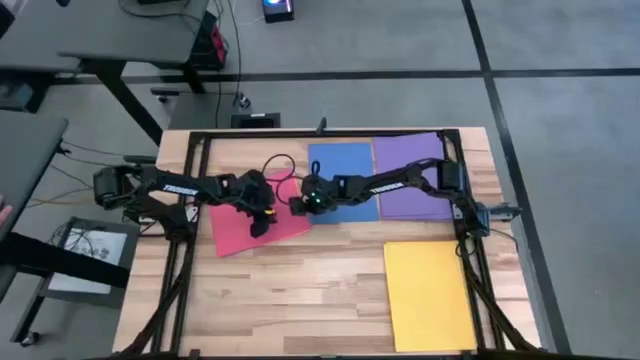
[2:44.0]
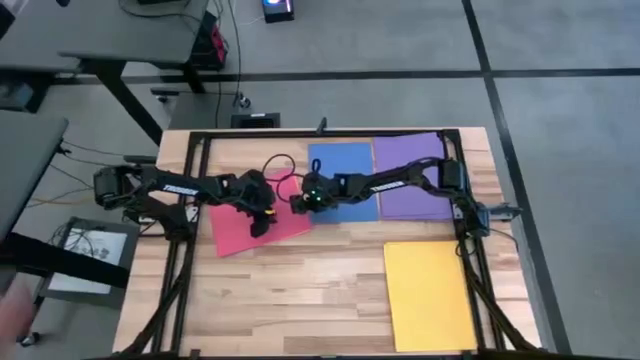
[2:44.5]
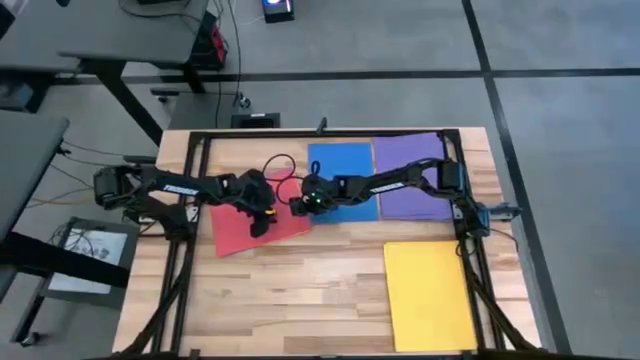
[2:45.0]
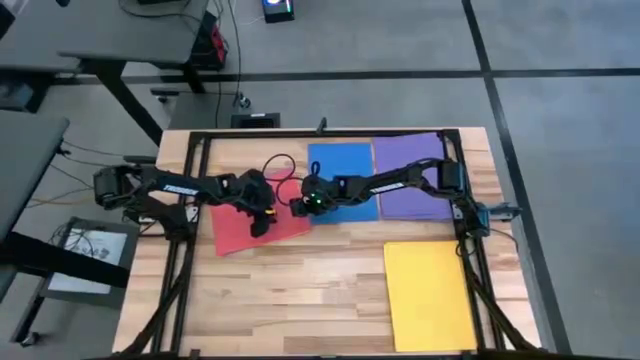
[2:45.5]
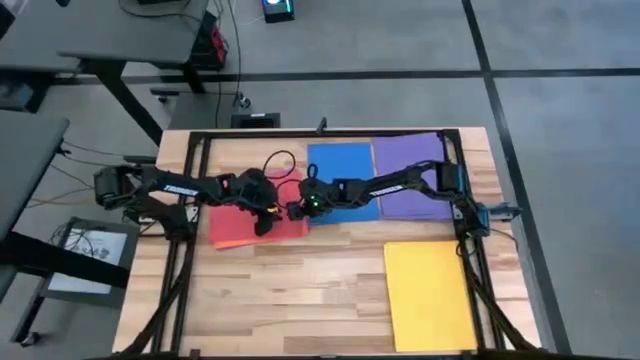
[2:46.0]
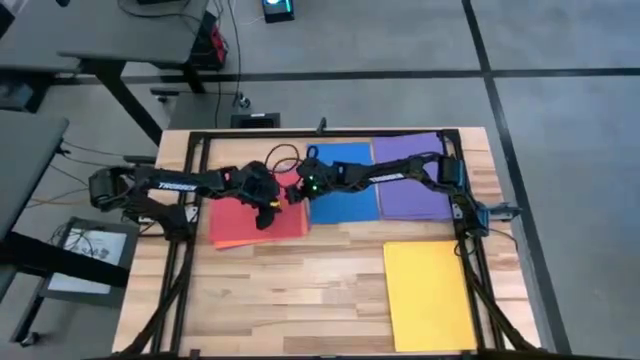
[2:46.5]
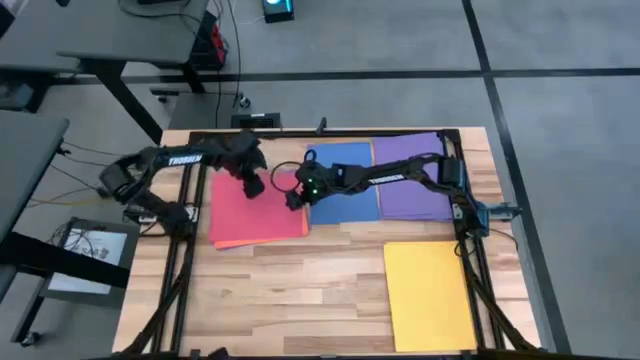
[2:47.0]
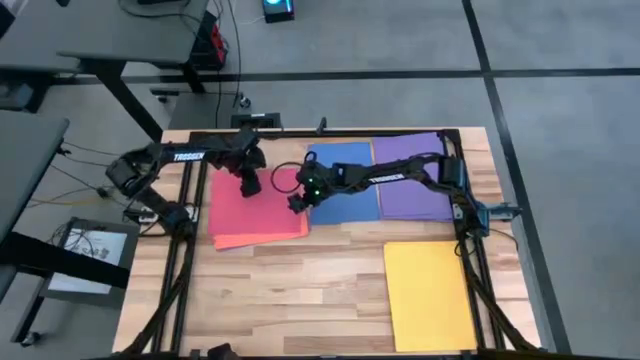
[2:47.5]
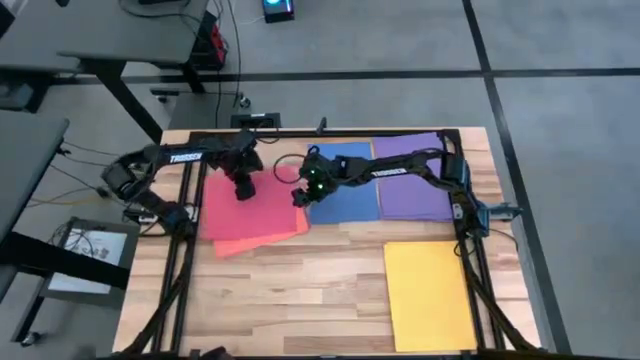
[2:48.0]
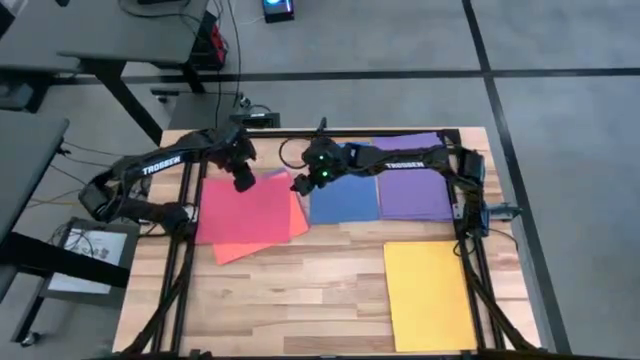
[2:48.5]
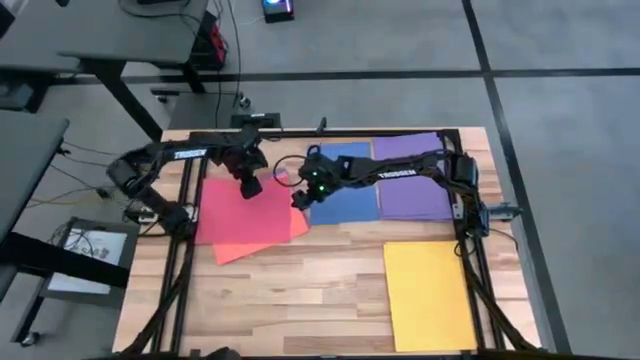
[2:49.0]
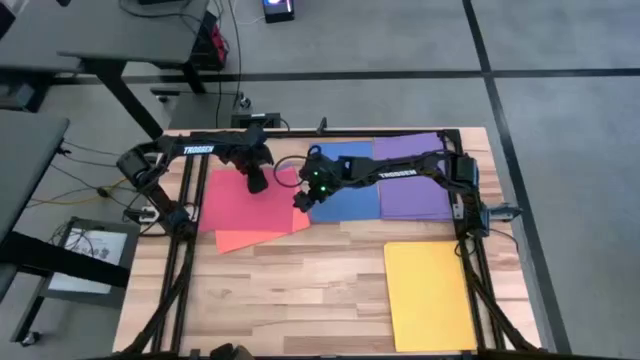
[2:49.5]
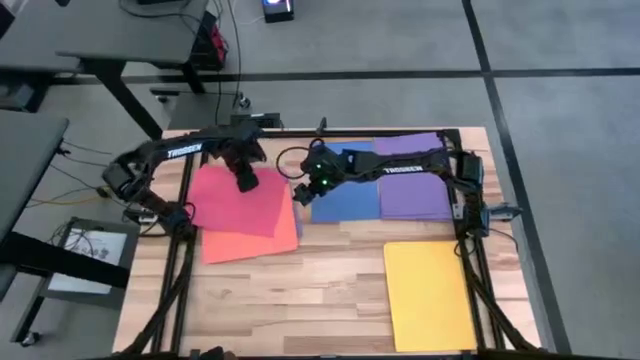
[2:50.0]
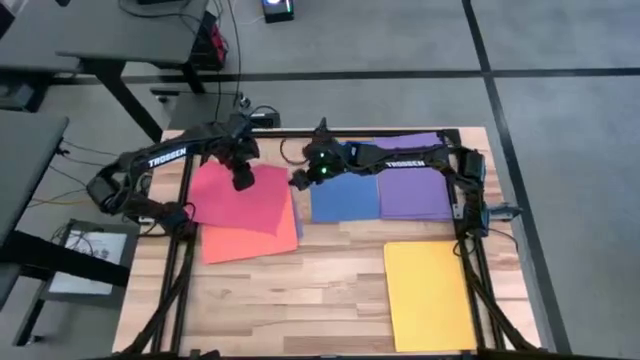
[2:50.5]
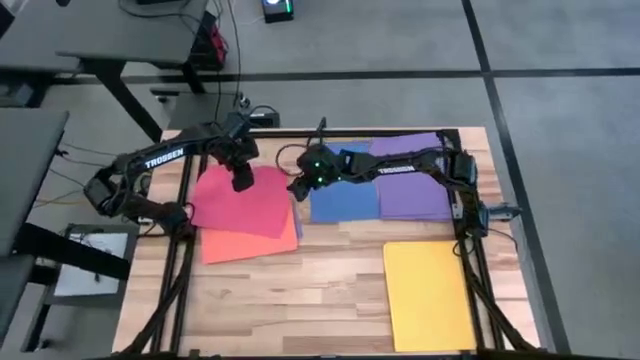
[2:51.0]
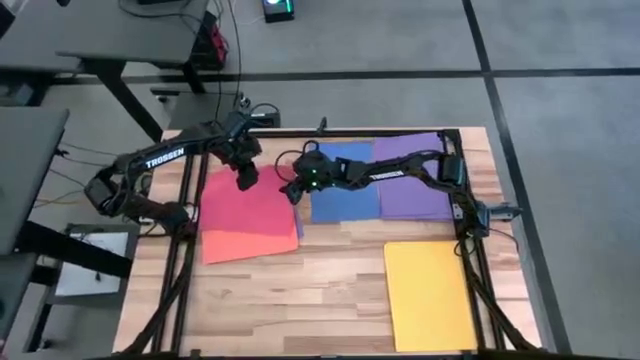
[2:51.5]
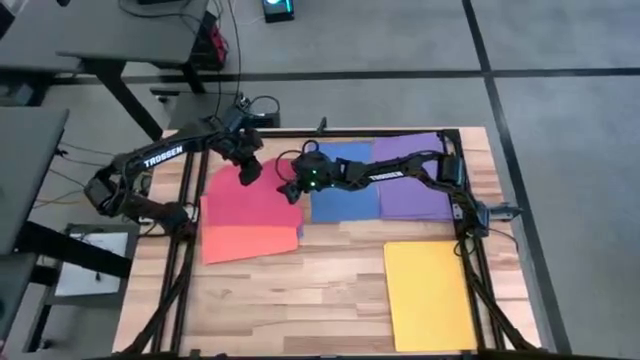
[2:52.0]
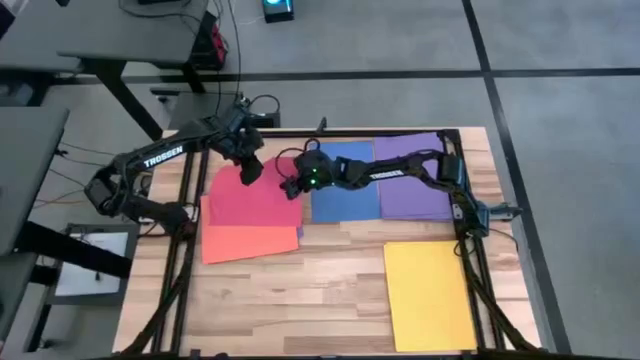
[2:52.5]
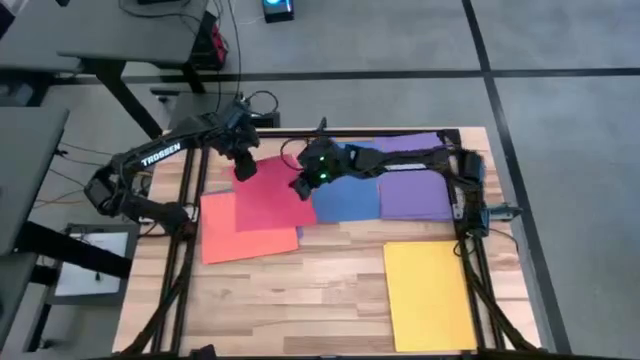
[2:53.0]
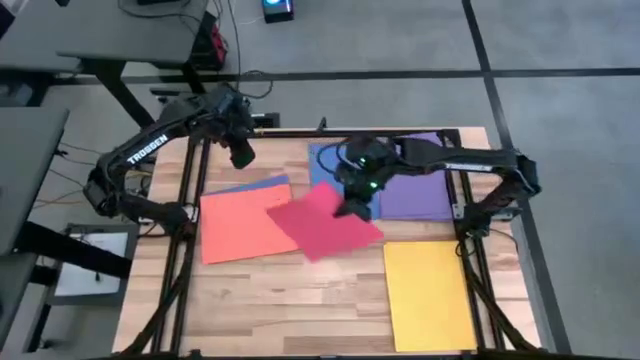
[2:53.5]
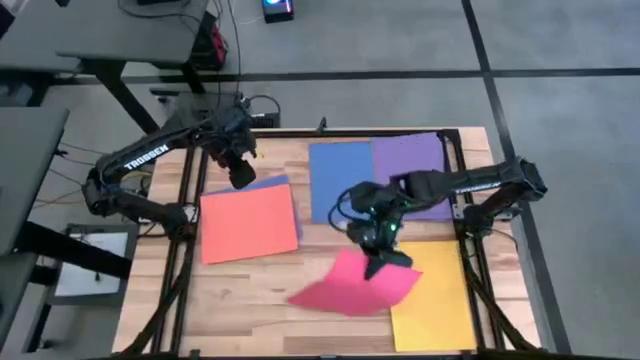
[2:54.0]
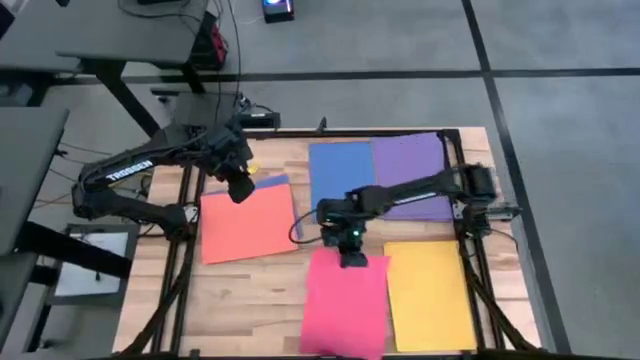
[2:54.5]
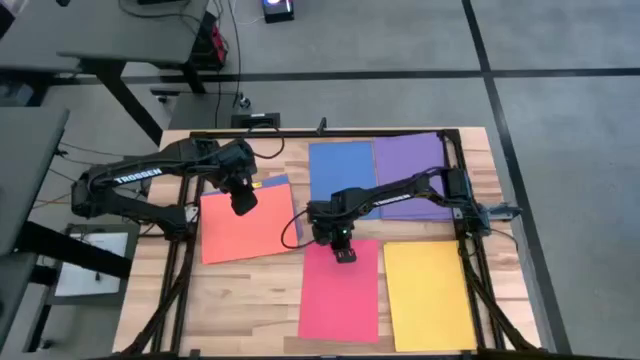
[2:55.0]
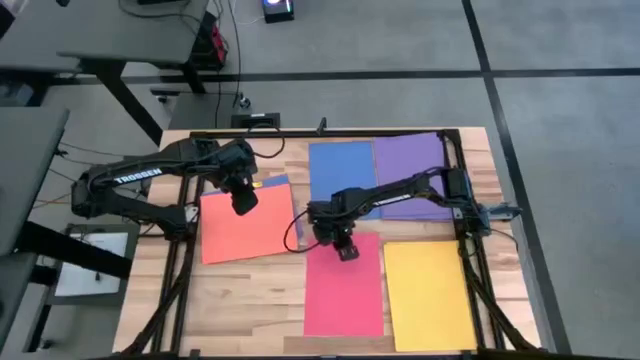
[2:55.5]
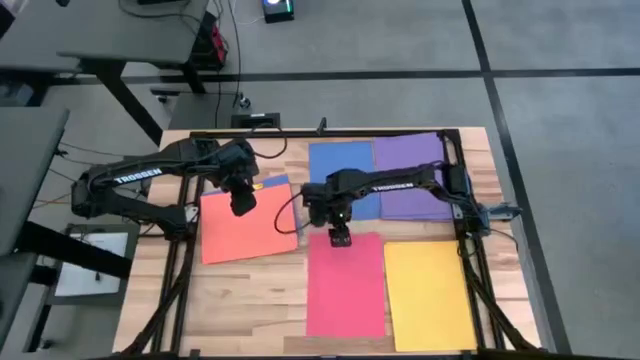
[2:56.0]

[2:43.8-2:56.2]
Task: Organize paper
Put the pink paper into the bottom center of the table

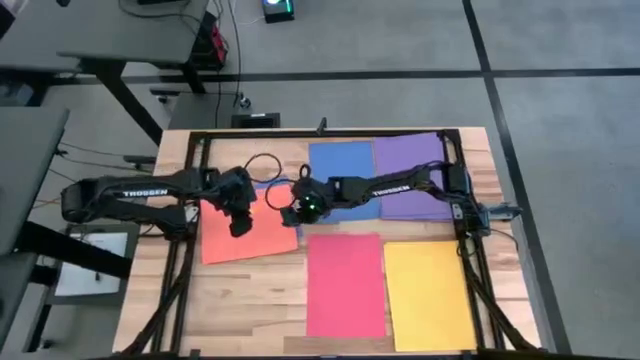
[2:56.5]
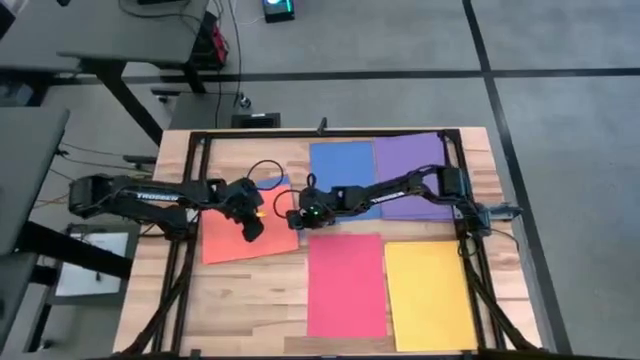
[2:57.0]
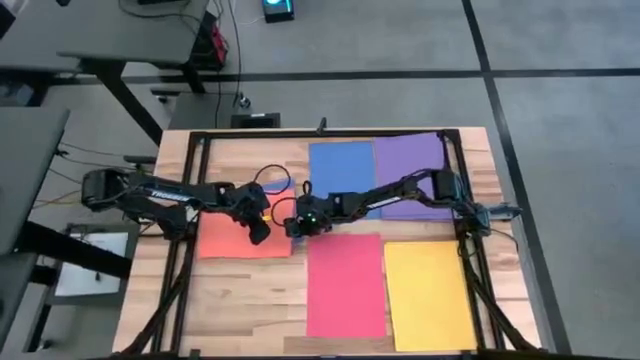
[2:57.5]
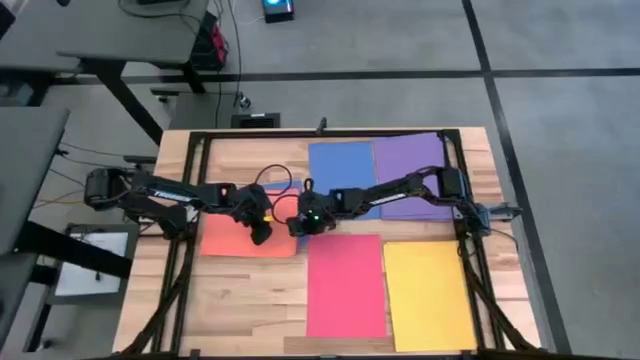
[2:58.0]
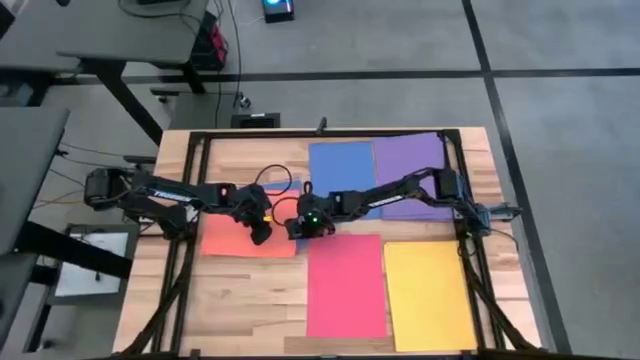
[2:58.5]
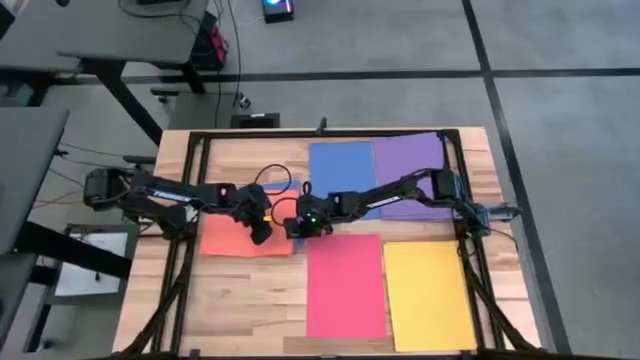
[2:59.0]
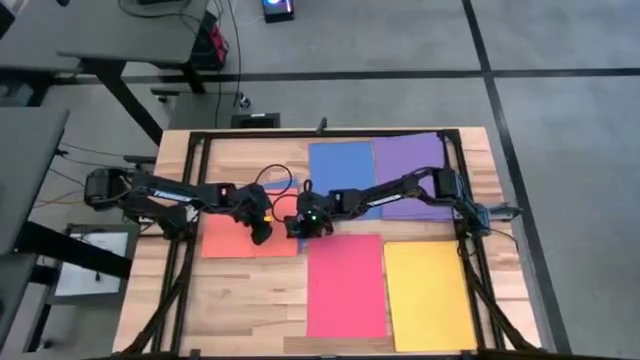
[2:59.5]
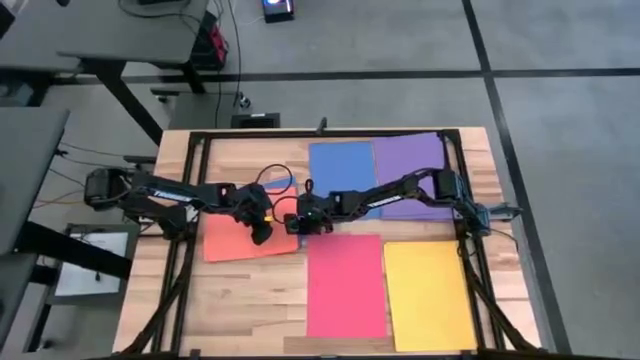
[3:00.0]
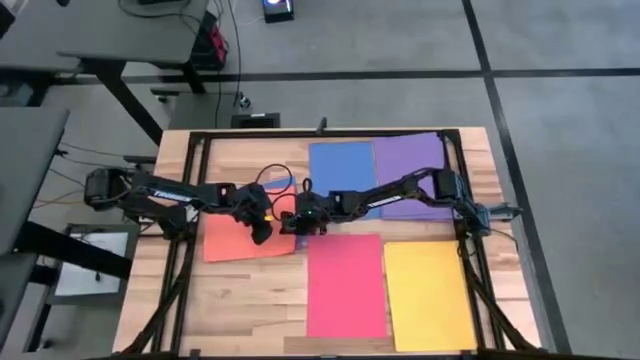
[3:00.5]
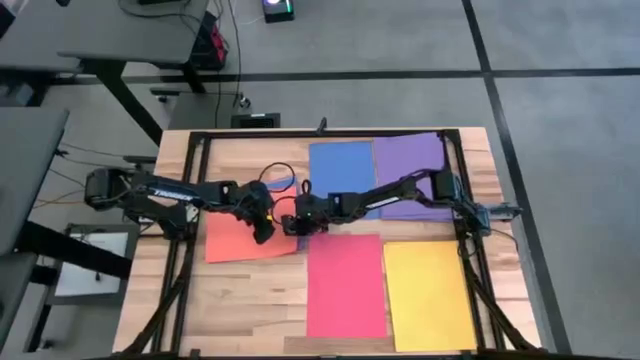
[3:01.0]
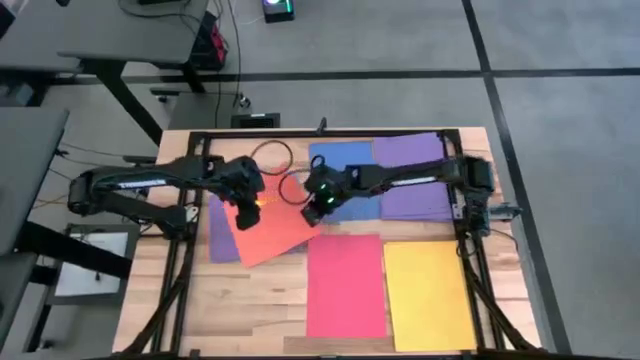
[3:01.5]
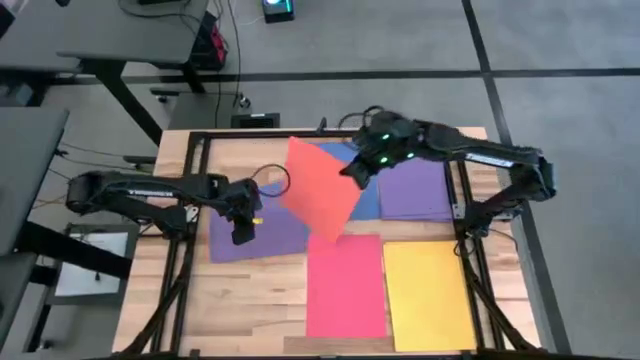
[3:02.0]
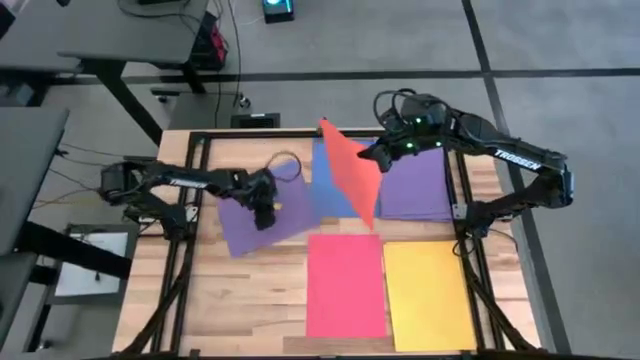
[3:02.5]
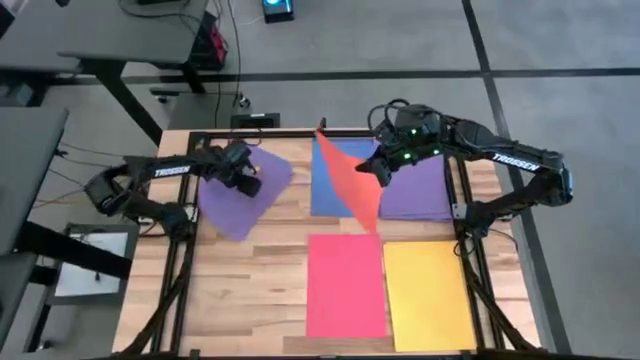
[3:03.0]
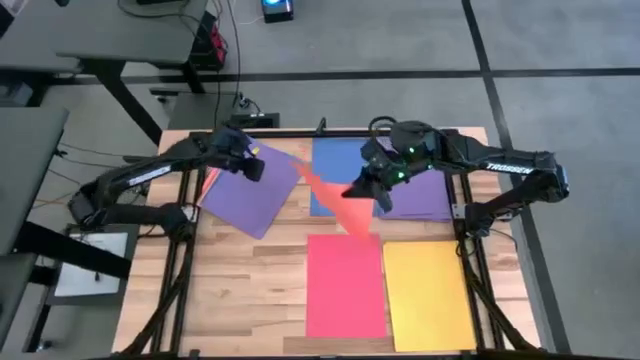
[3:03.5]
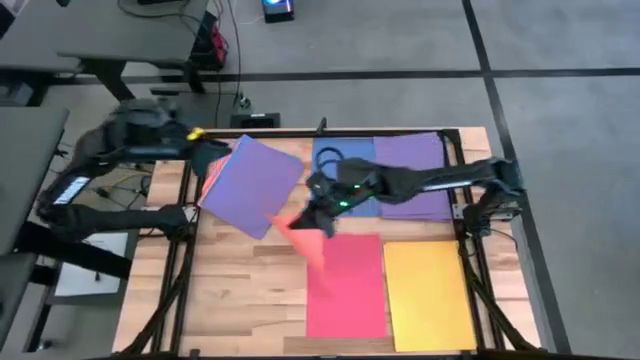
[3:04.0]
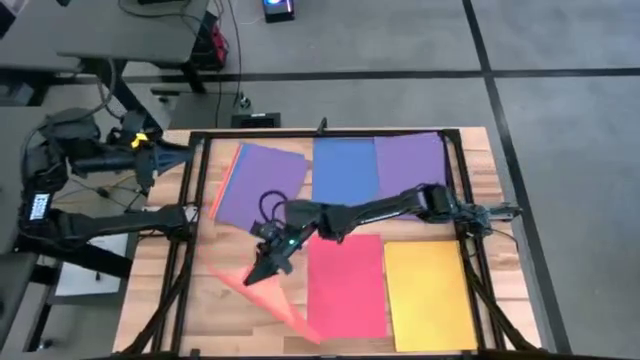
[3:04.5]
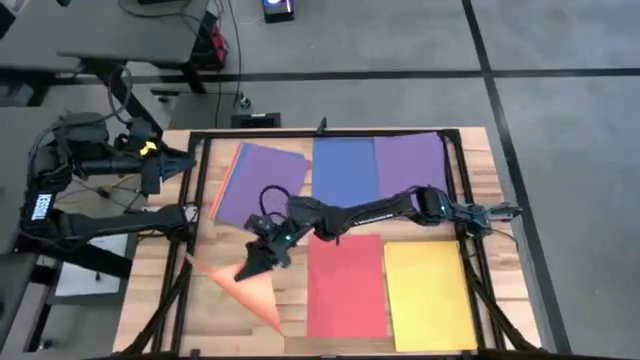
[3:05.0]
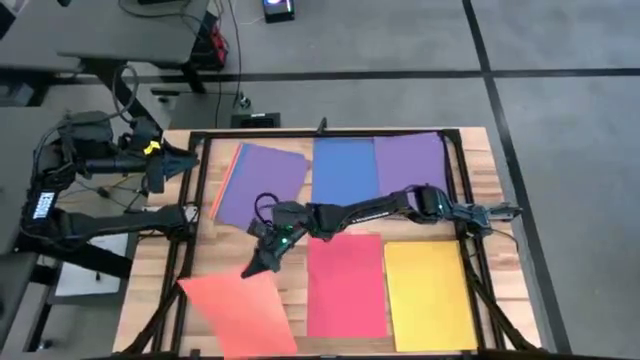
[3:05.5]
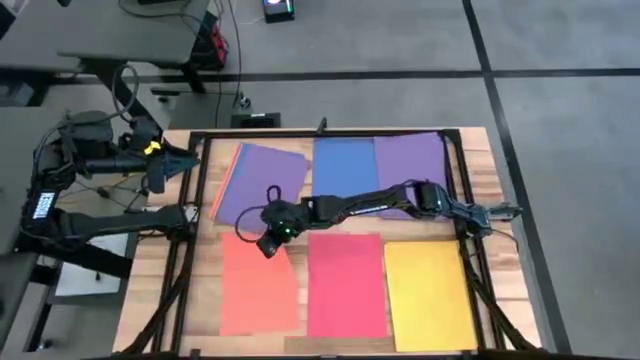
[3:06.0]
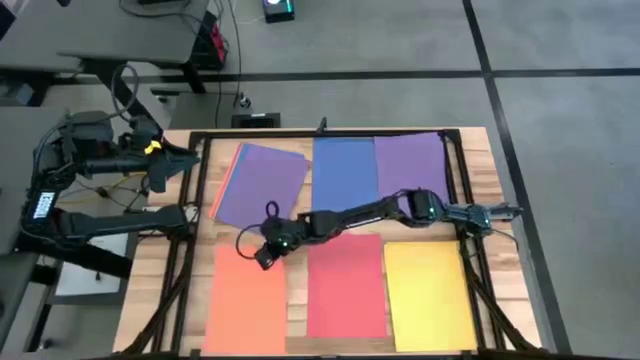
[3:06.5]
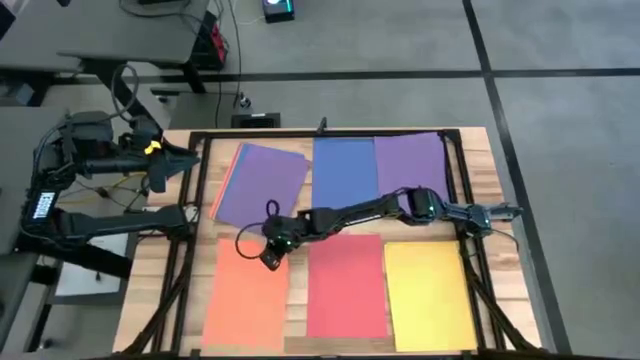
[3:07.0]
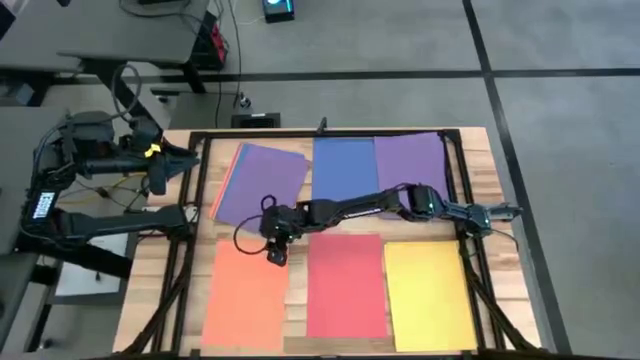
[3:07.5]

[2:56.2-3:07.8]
Put the orange paper into the bottom left of the table
